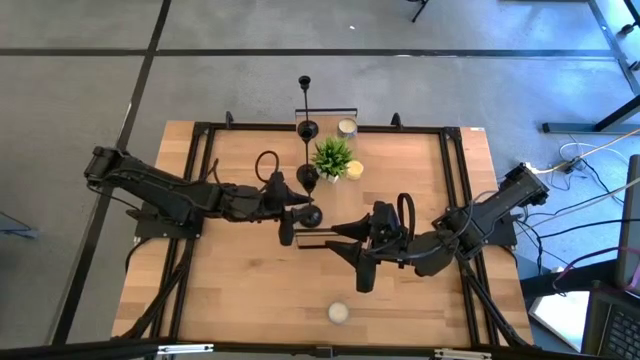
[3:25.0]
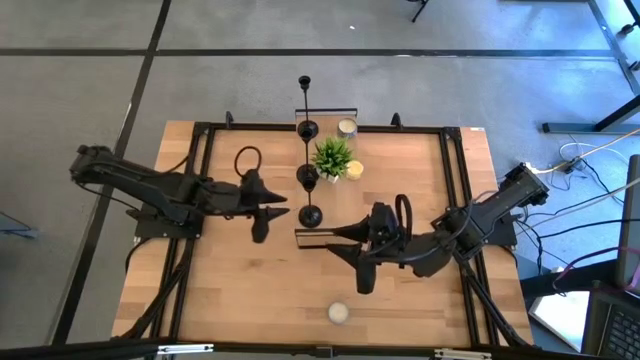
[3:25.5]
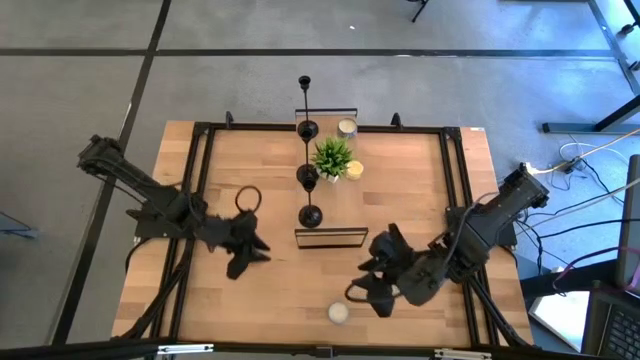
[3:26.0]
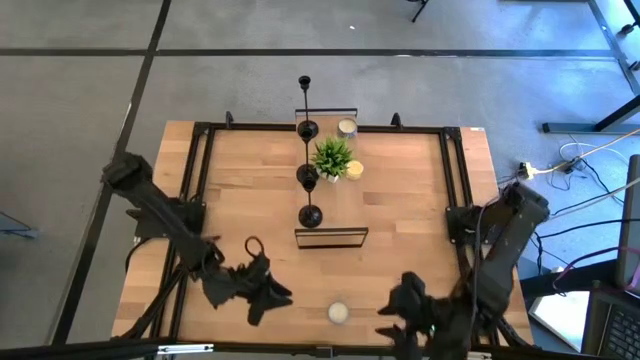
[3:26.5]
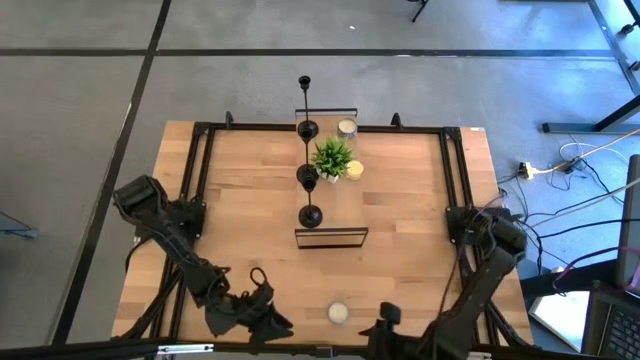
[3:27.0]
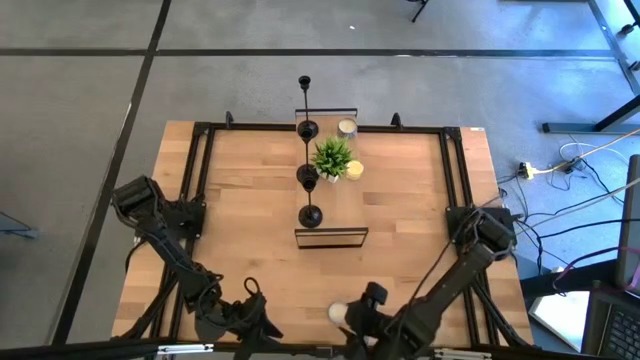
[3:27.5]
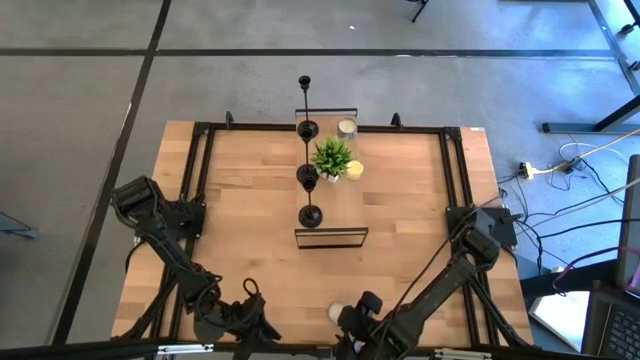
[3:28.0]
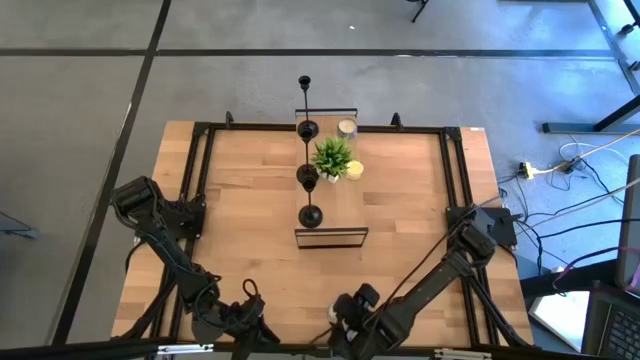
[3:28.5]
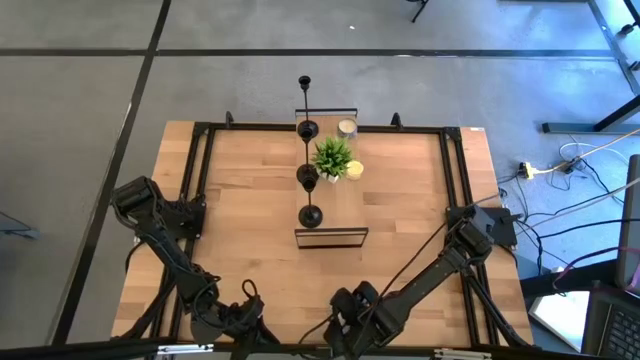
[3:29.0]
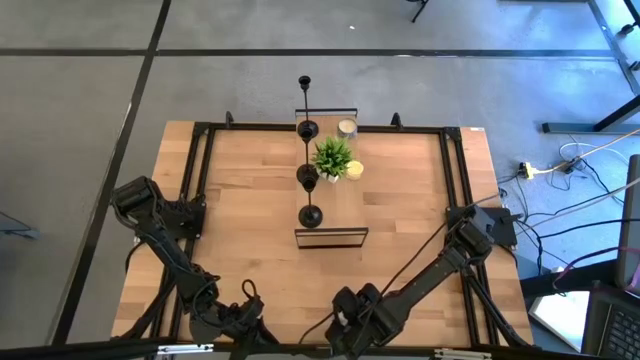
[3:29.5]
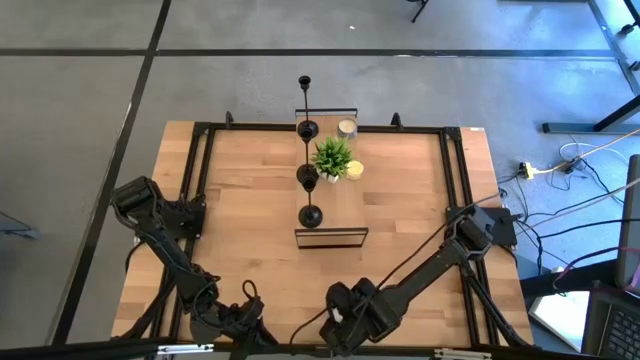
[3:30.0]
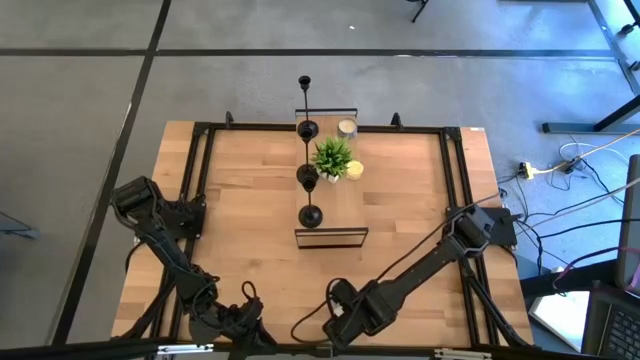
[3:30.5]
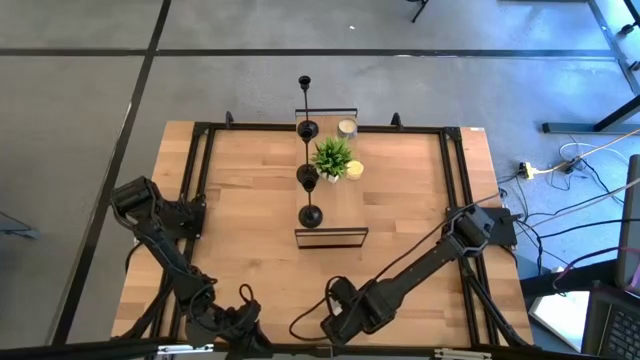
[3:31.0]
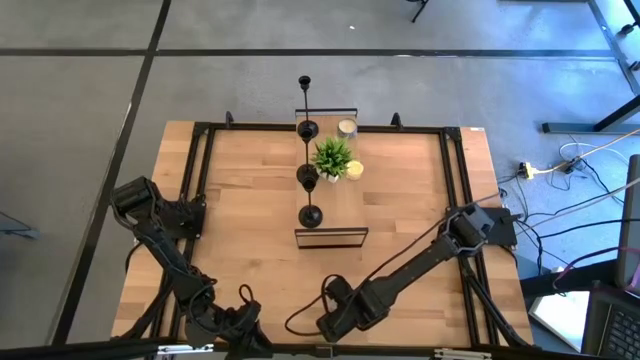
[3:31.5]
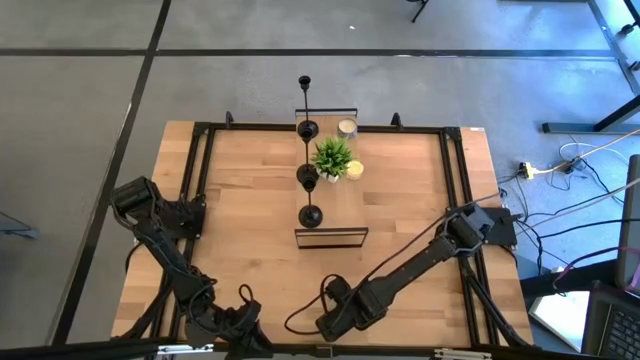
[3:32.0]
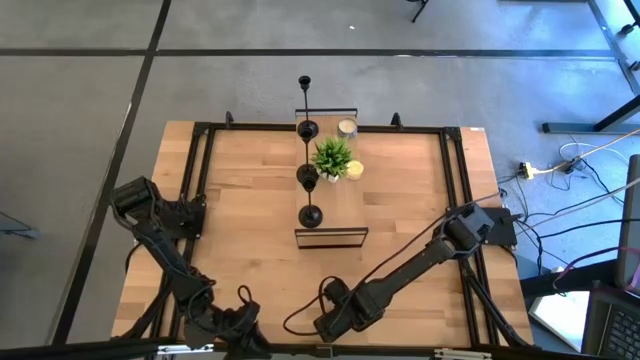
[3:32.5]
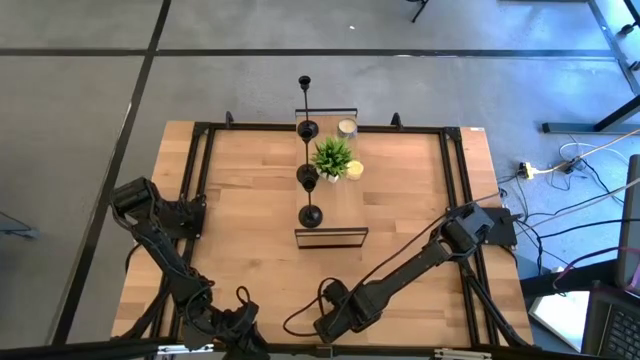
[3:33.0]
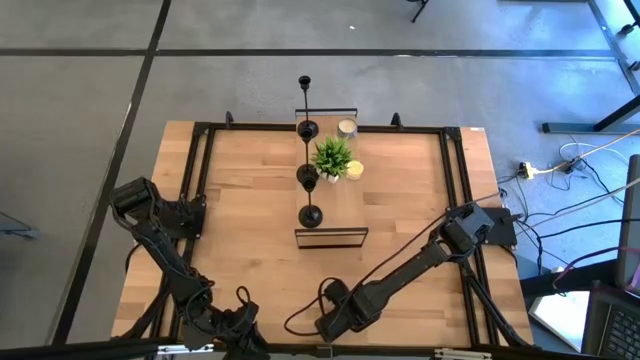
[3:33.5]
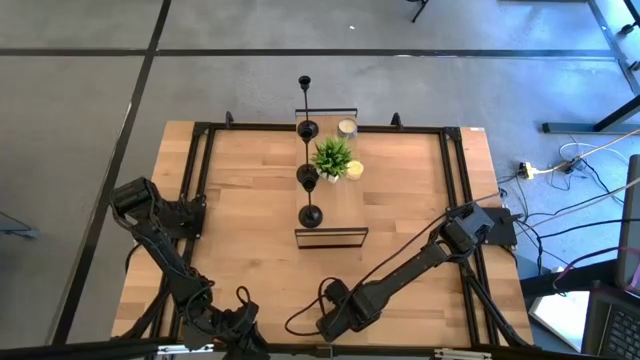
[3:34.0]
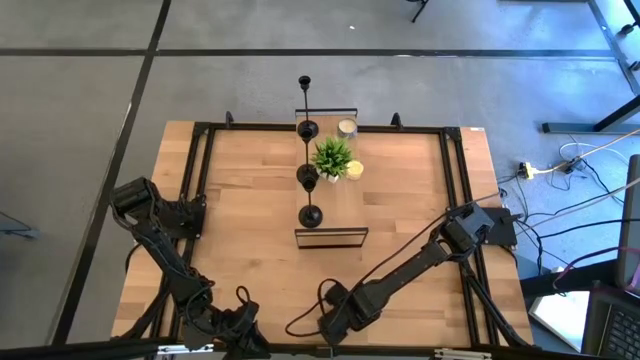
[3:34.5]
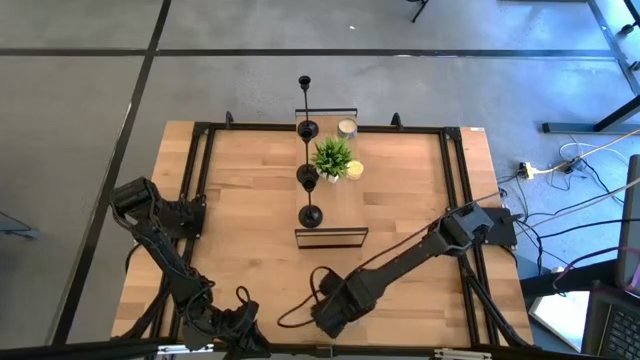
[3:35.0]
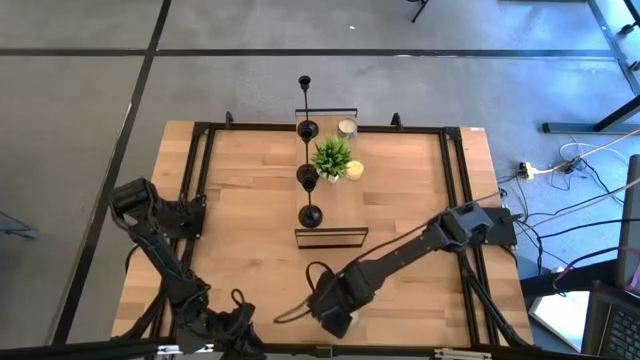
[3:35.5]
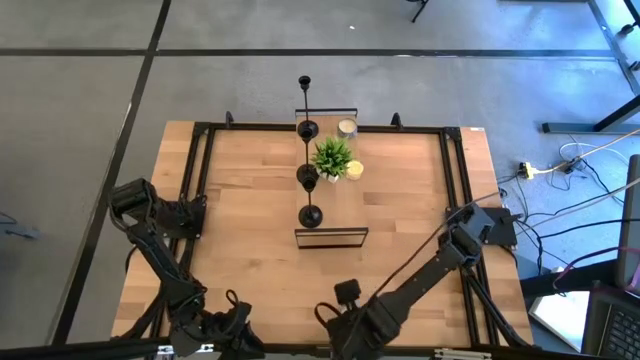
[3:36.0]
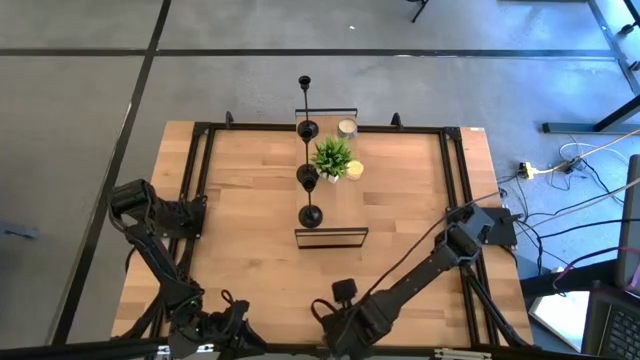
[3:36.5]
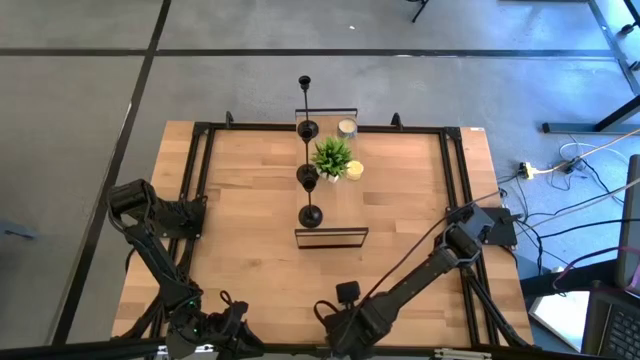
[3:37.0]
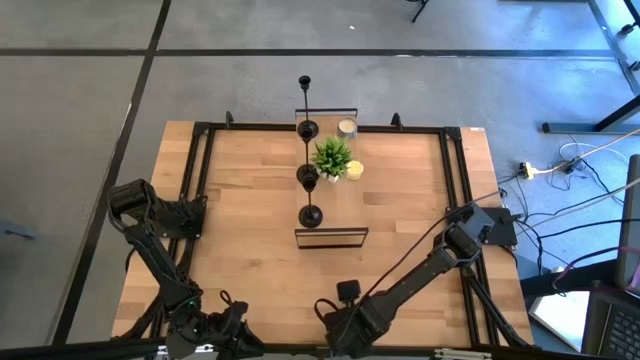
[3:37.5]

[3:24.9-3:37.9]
Task: Pick & Place candle stick holders
Put the blue scented candle on the shelf

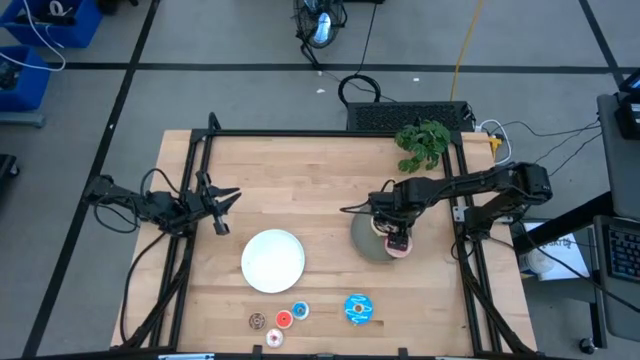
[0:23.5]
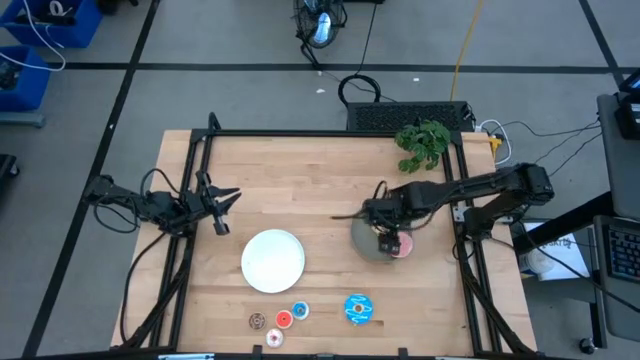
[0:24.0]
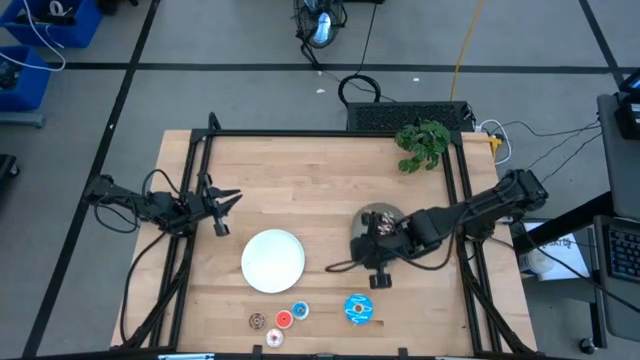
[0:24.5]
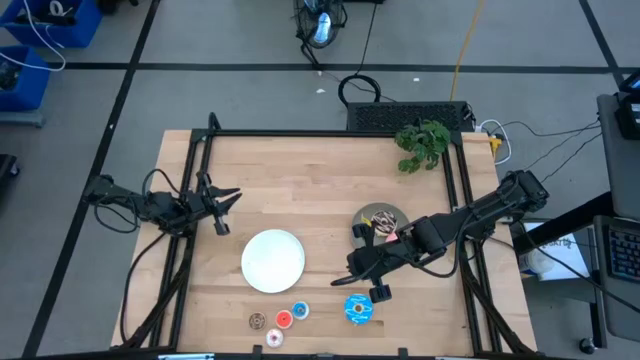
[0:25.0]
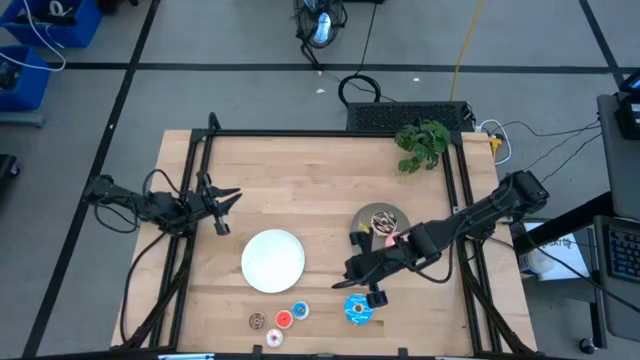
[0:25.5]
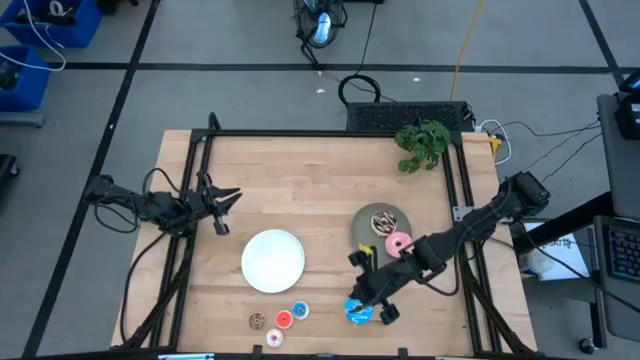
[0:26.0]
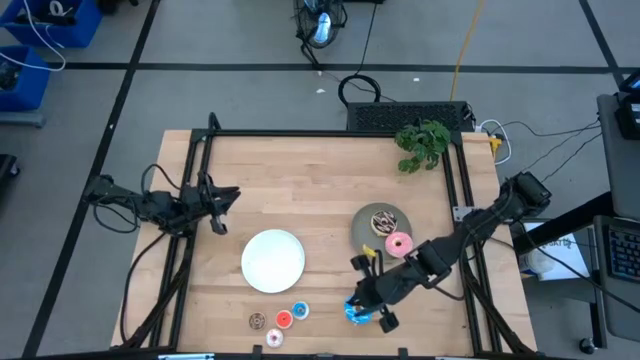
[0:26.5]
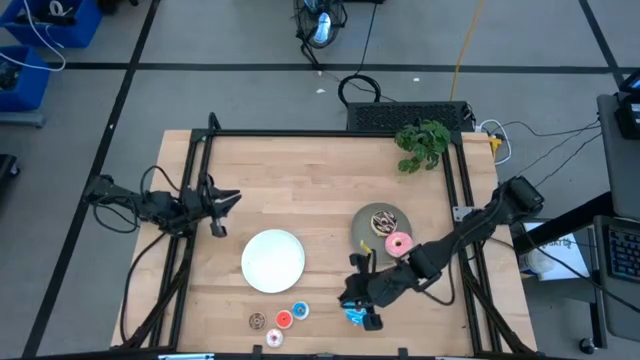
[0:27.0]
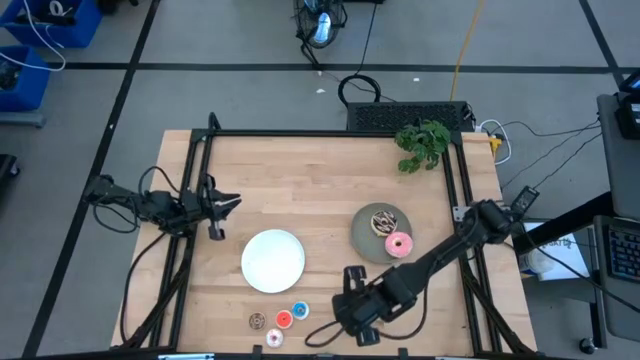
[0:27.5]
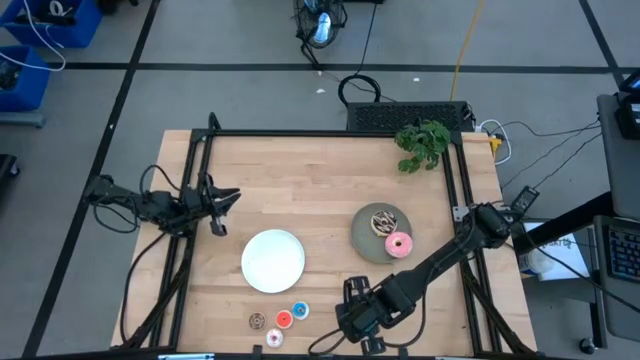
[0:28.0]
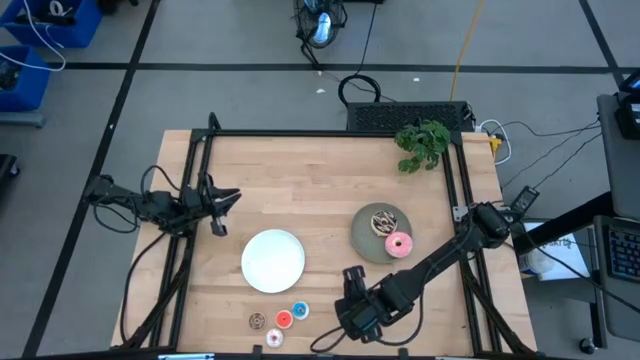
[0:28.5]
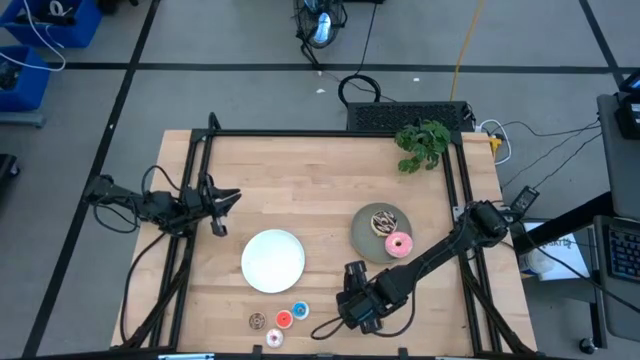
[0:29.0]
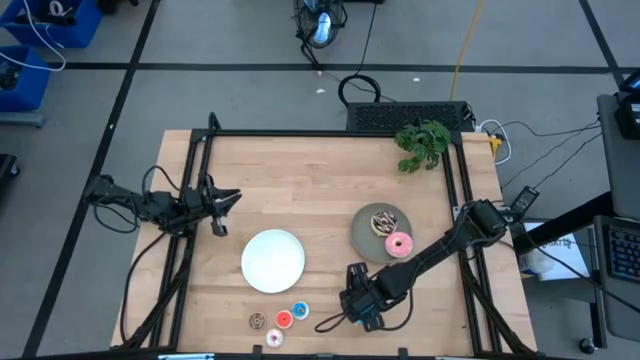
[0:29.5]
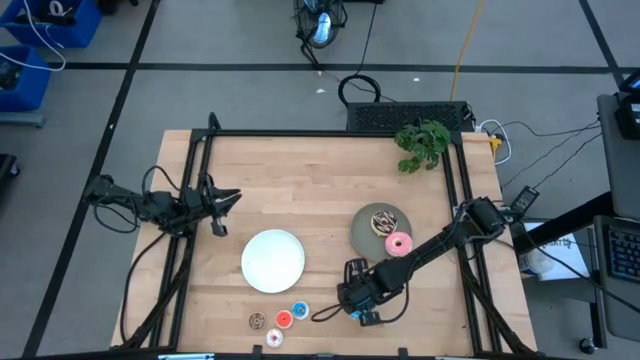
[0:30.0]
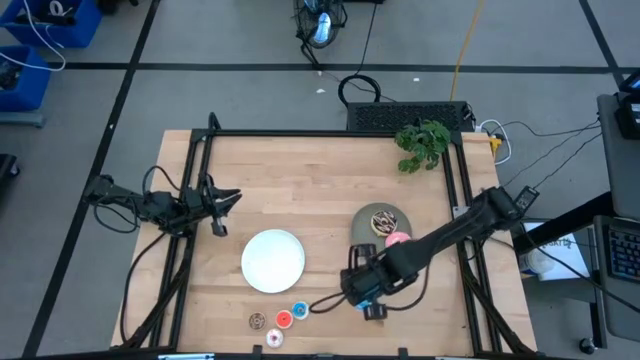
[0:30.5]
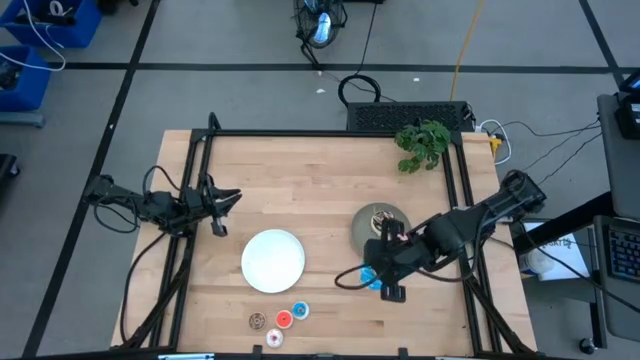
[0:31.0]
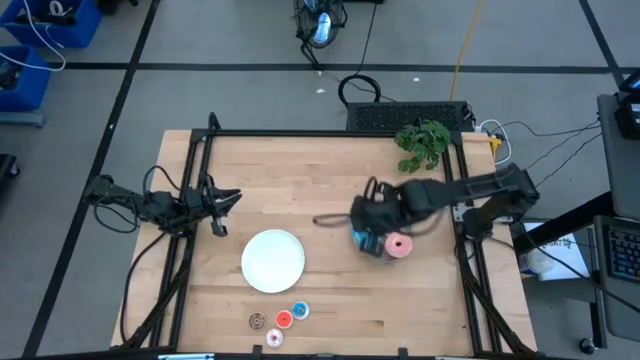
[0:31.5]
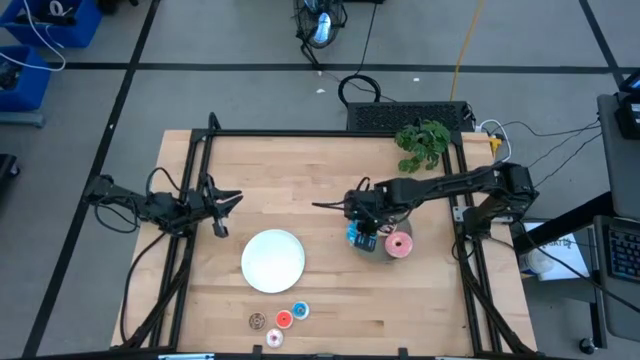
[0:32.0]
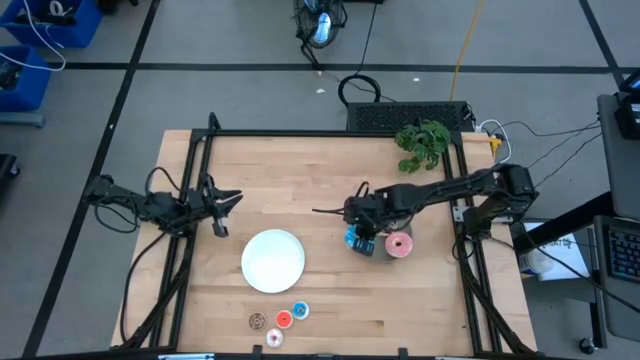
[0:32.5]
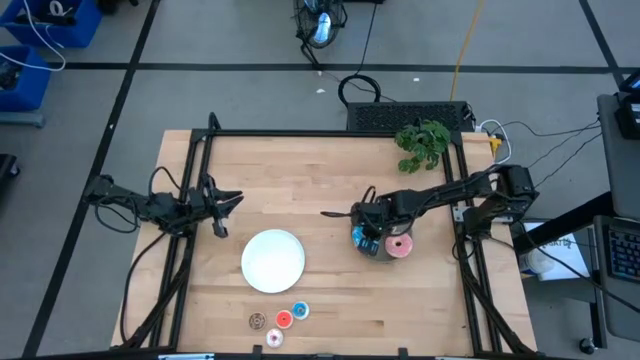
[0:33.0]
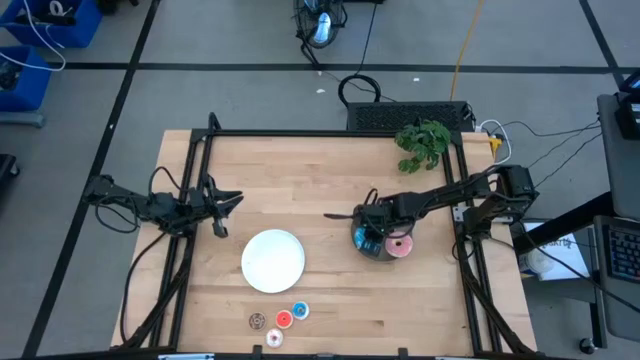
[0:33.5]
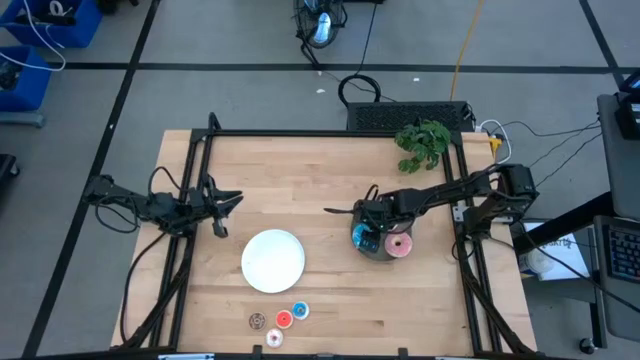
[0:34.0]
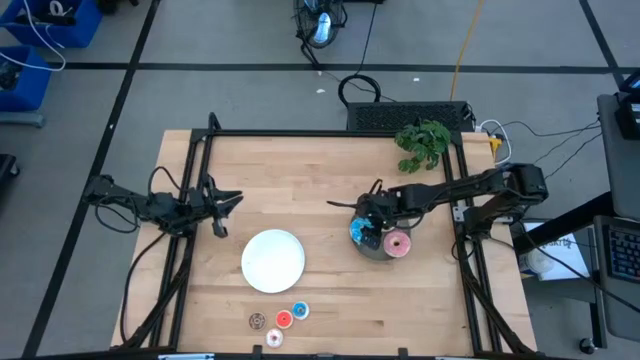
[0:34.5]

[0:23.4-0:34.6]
Task: Pick & Place donuts
Put the large blue donut on the gray plate
